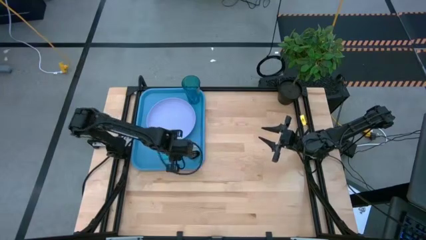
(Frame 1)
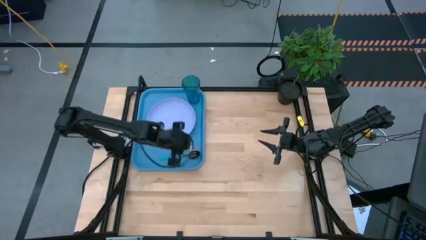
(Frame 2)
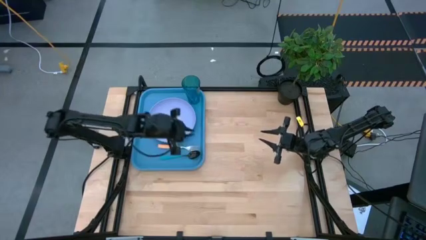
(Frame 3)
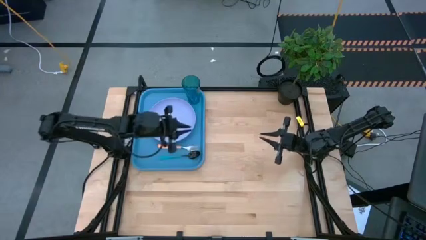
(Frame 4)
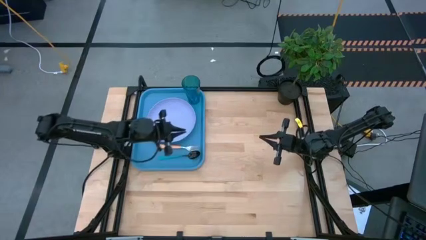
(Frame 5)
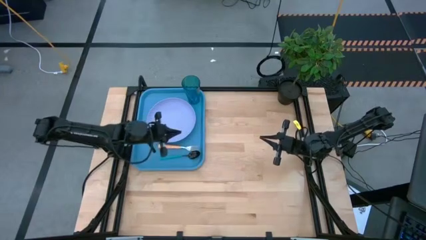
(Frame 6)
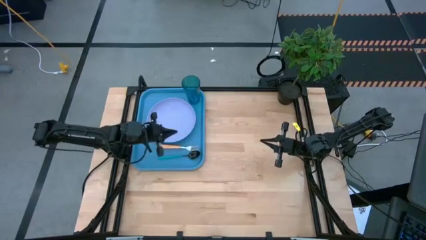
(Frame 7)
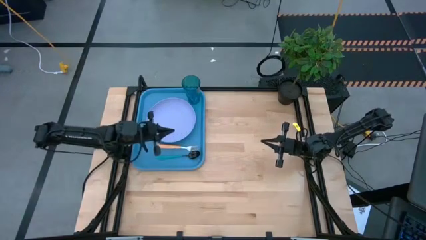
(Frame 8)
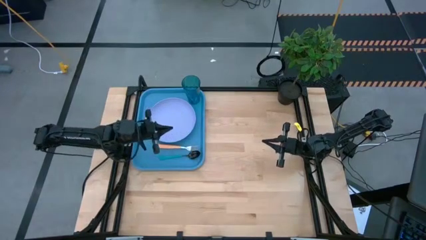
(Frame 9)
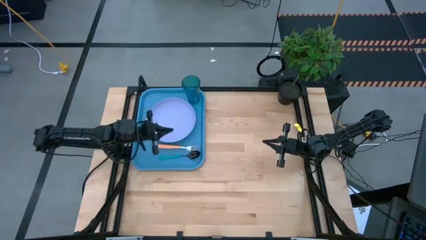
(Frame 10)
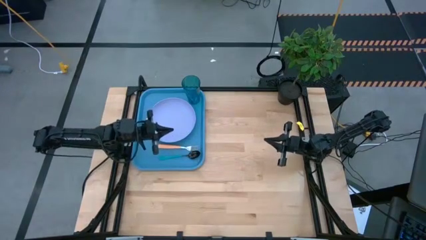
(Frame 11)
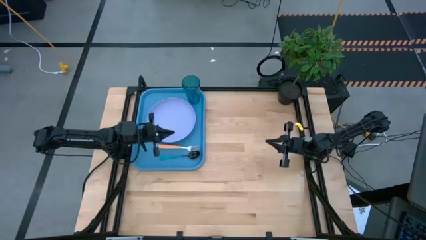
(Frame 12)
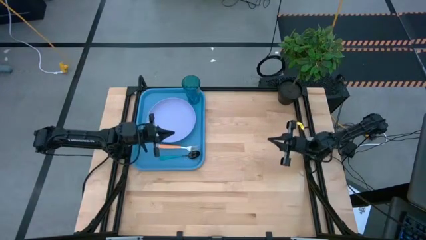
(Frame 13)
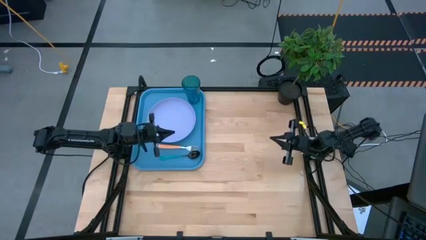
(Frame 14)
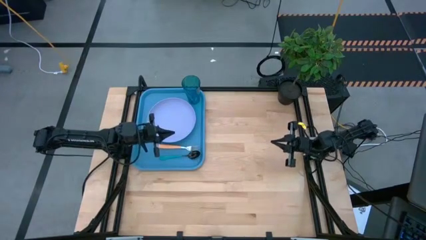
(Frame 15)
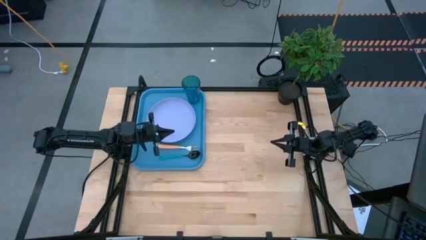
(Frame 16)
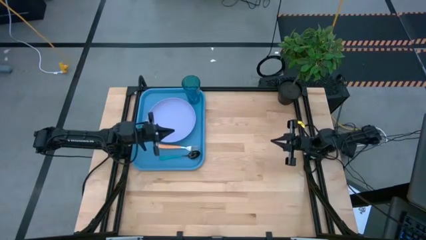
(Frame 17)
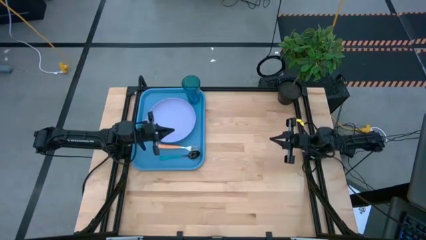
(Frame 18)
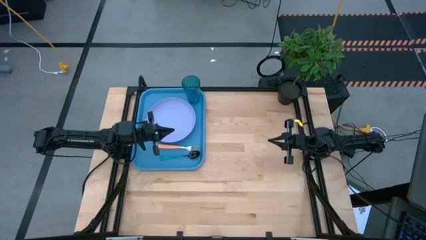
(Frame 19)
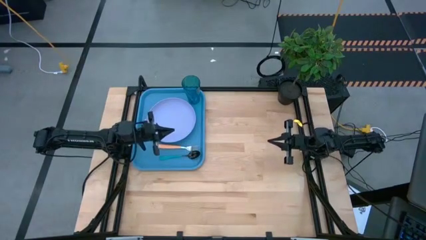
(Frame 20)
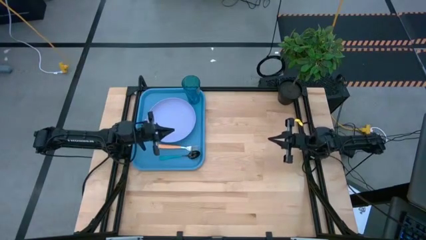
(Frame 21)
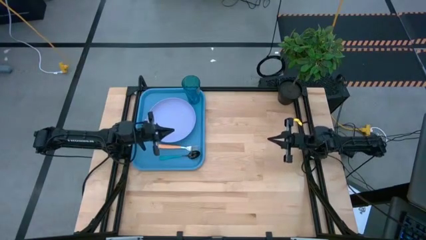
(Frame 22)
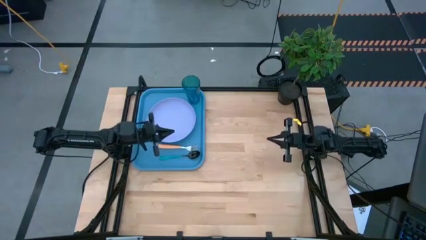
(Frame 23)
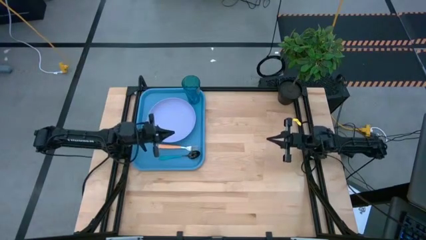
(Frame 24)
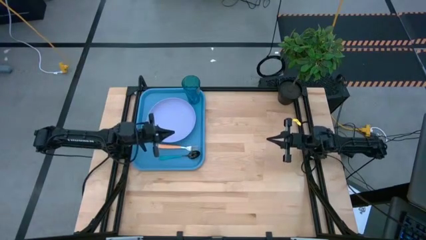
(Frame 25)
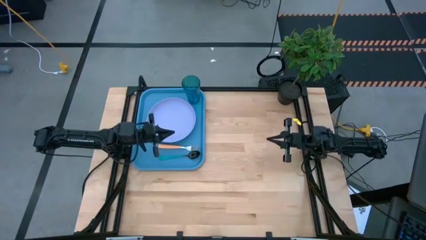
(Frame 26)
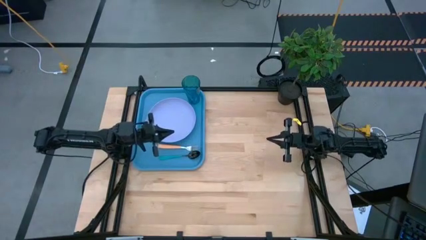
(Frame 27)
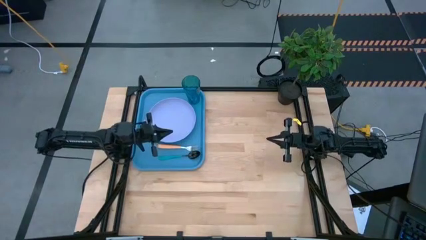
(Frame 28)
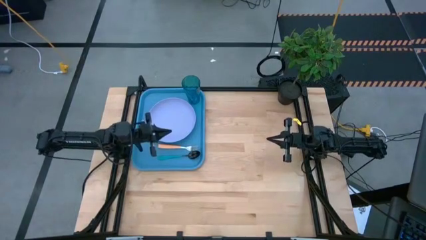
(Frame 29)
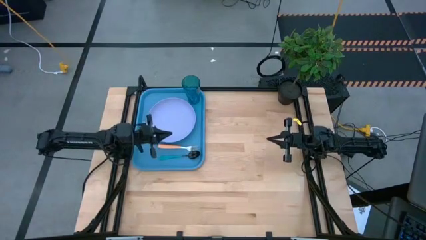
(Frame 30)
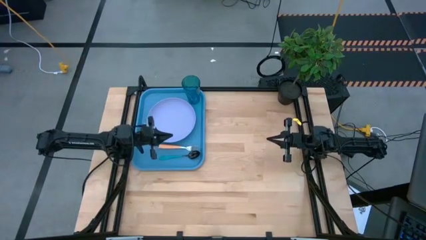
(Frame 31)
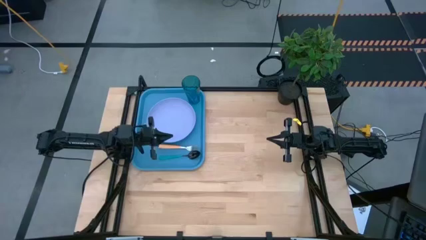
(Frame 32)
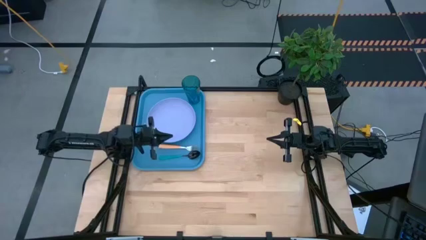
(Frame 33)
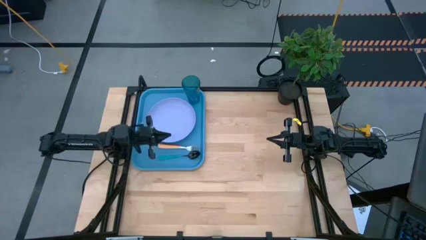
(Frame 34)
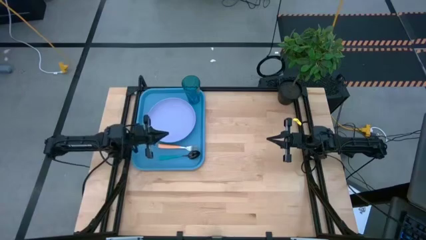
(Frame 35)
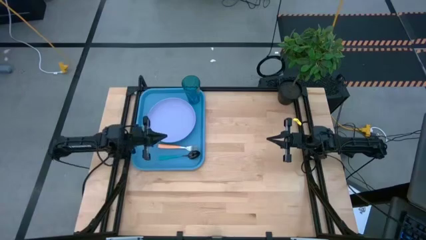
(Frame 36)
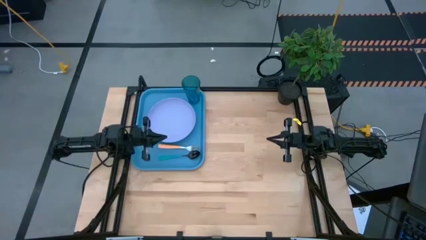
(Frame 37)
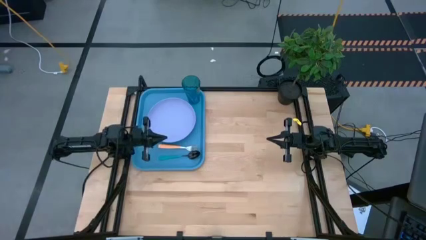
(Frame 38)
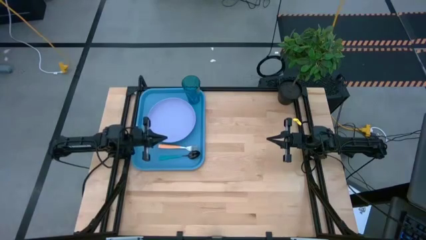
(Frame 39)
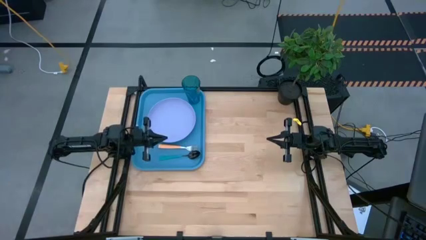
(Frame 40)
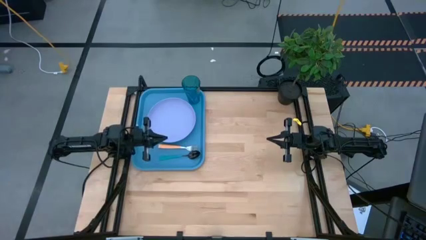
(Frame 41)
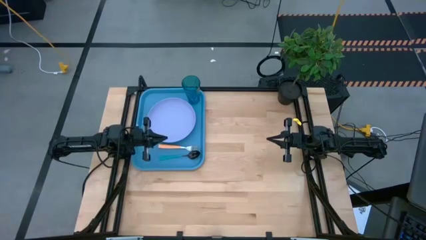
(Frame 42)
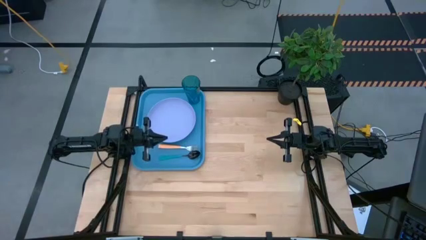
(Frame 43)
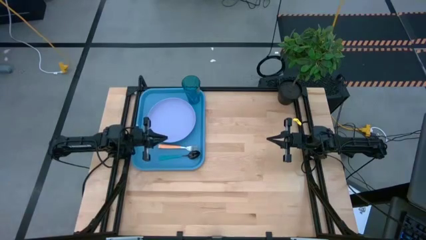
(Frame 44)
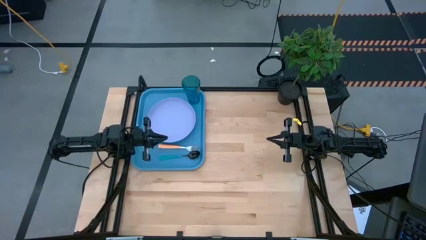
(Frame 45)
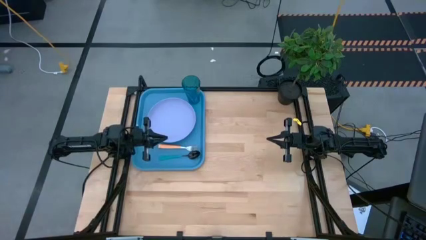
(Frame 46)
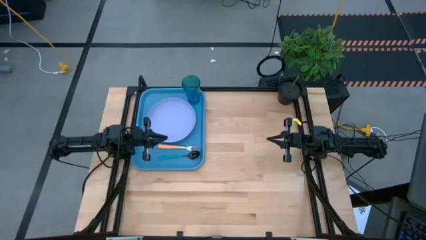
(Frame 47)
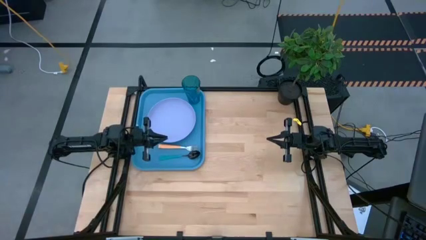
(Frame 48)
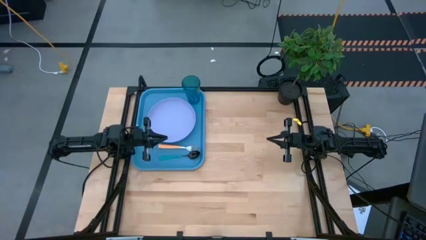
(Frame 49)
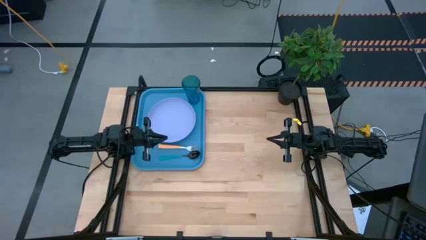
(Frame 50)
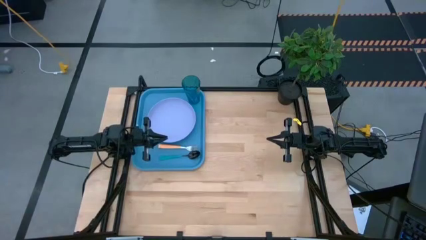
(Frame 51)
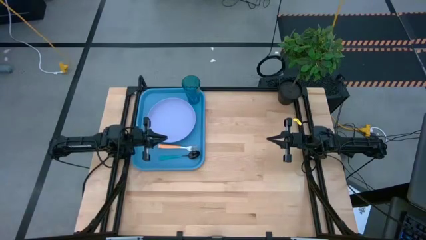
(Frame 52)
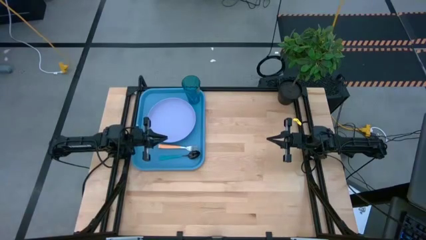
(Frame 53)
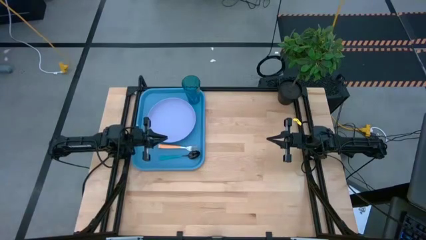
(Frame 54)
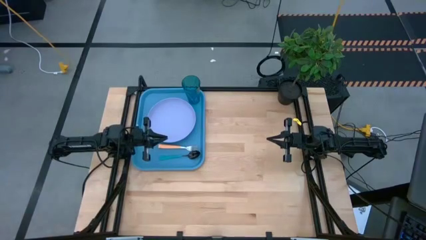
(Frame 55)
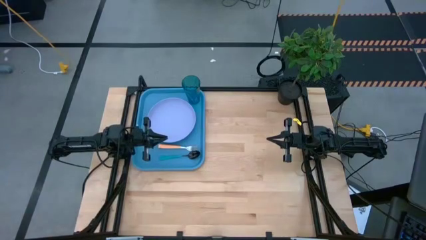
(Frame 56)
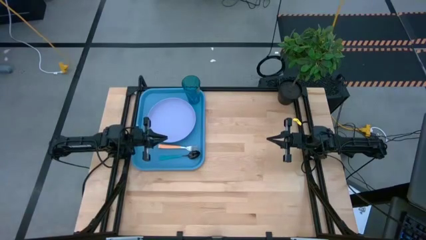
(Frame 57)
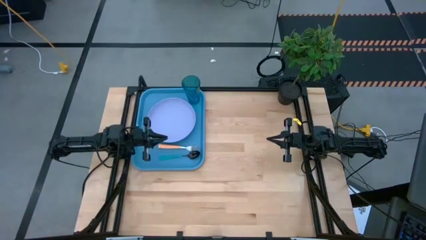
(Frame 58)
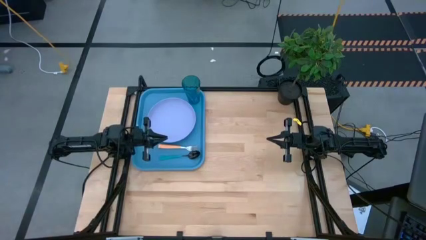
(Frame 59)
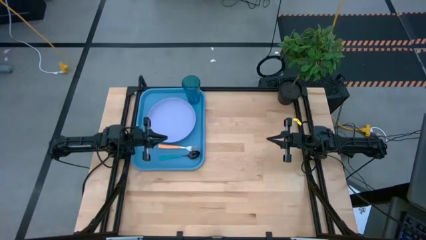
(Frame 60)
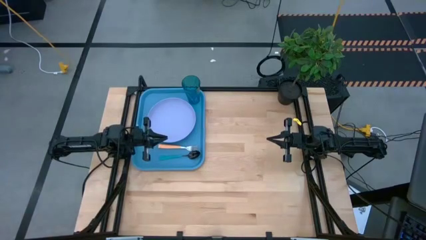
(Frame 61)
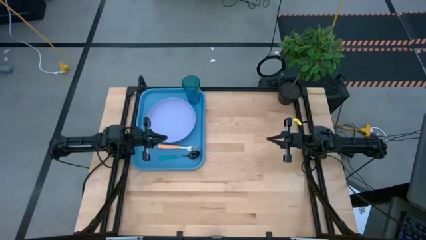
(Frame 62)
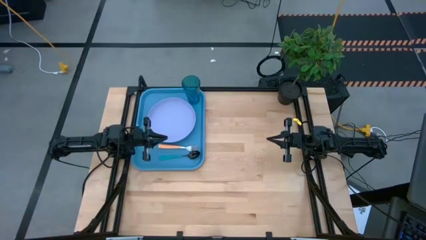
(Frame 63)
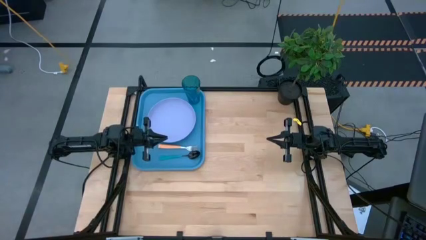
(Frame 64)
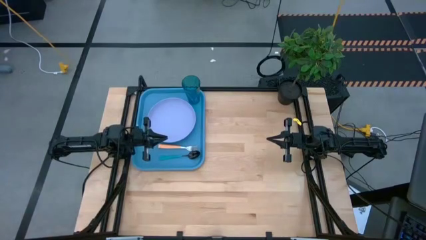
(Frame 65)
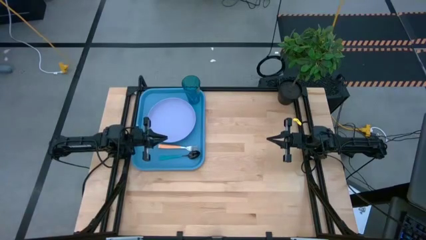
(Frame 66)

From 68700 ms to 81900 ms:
Task: Pick and place plate/cup/fork/spoon on tray
Return to Home Position
